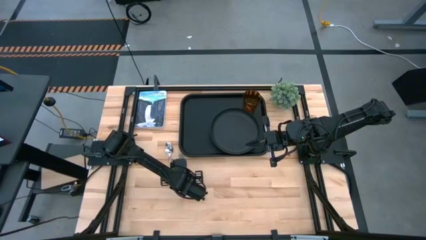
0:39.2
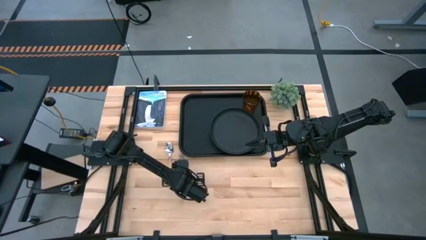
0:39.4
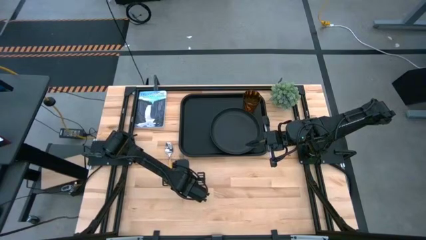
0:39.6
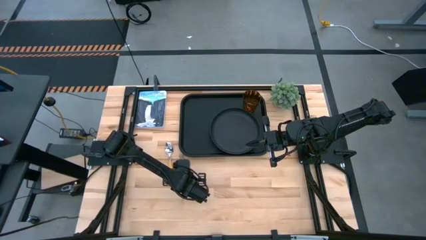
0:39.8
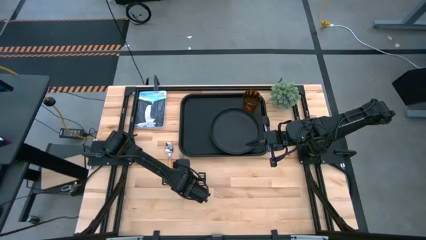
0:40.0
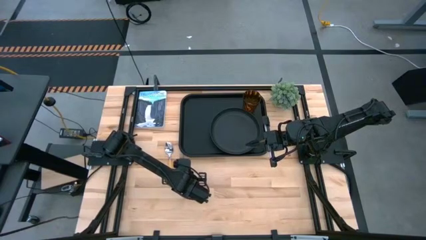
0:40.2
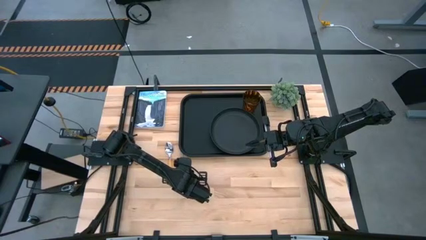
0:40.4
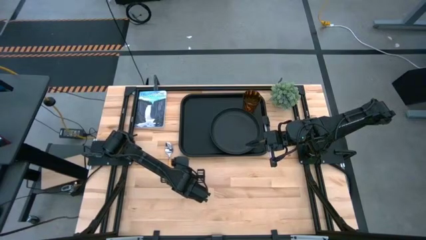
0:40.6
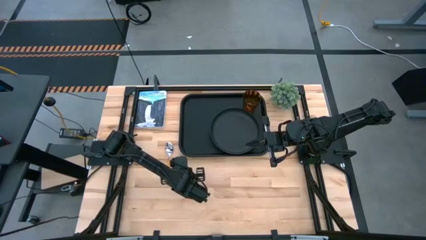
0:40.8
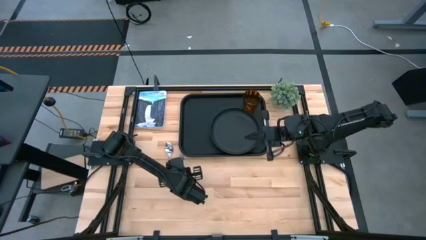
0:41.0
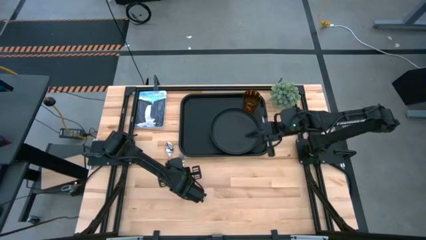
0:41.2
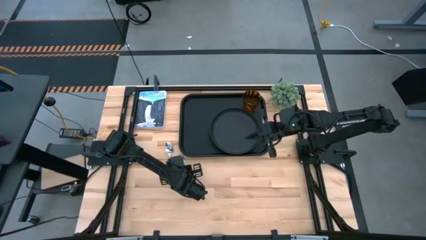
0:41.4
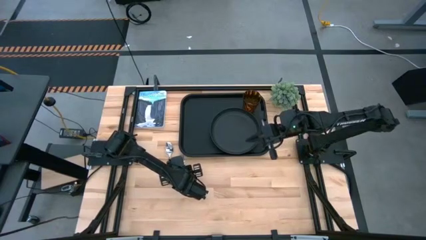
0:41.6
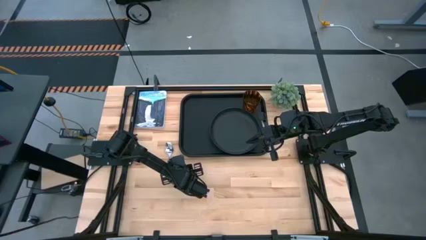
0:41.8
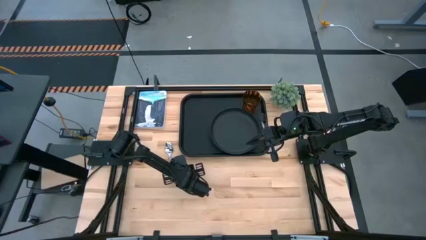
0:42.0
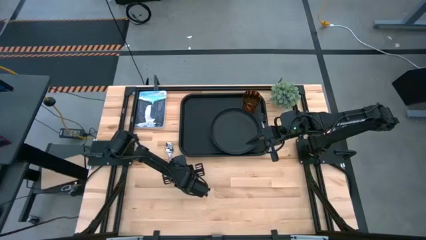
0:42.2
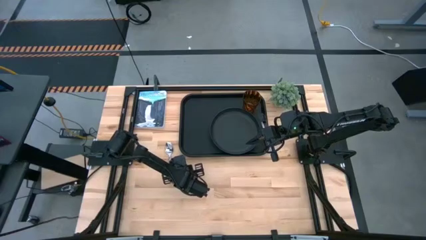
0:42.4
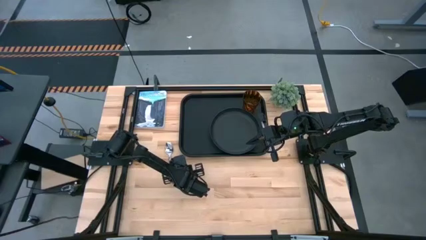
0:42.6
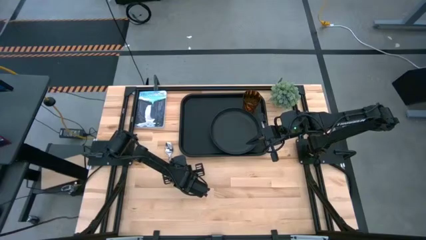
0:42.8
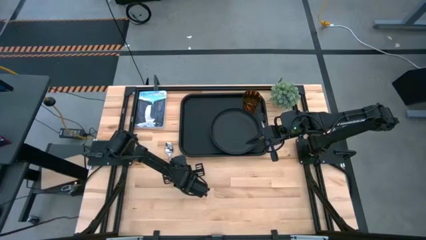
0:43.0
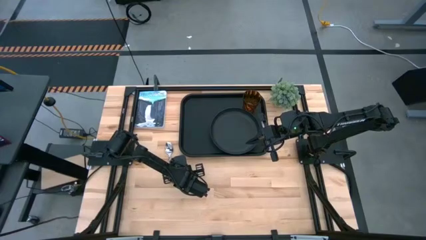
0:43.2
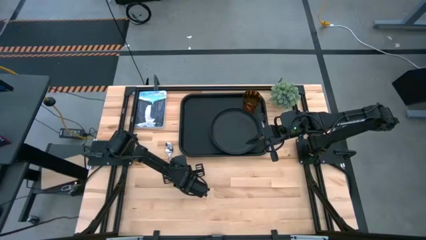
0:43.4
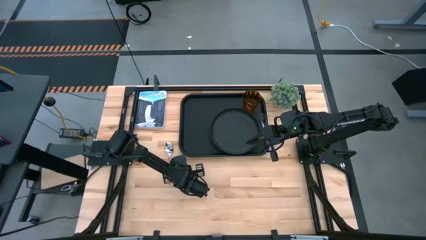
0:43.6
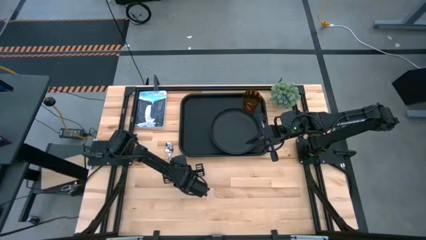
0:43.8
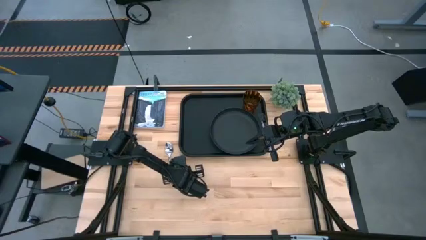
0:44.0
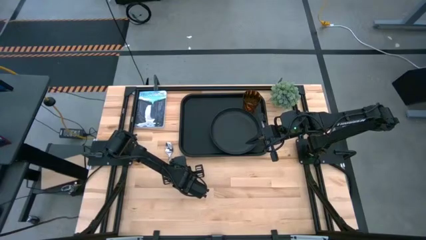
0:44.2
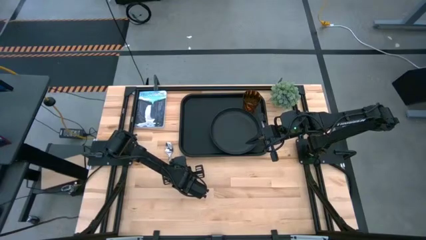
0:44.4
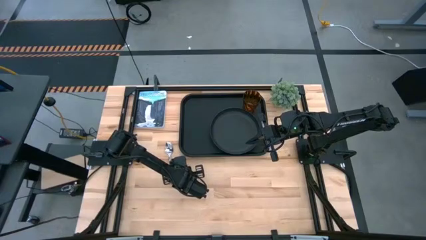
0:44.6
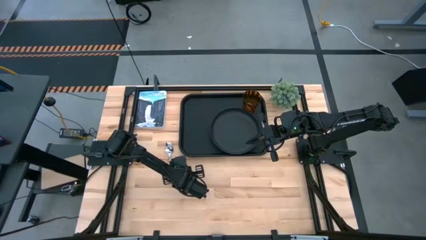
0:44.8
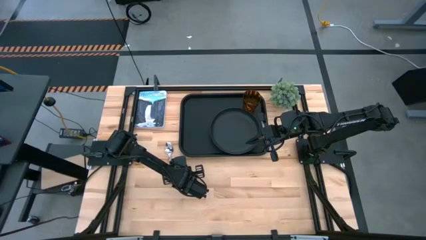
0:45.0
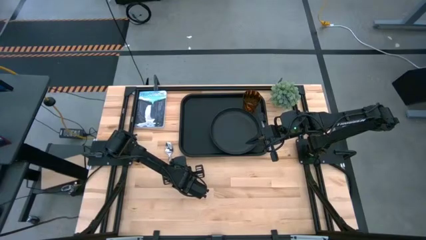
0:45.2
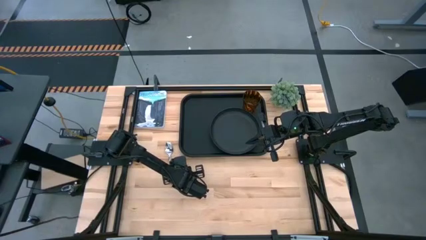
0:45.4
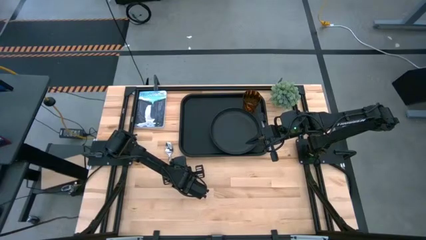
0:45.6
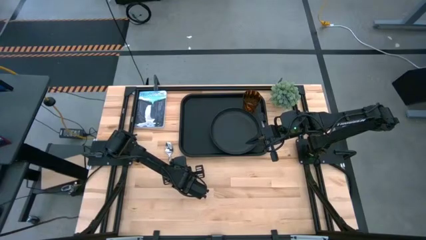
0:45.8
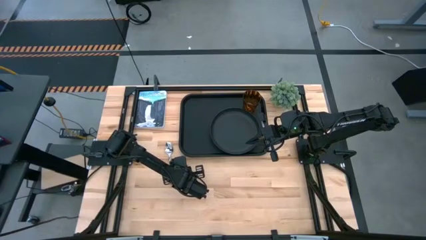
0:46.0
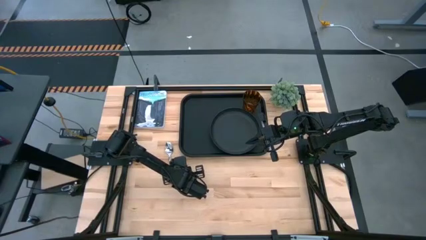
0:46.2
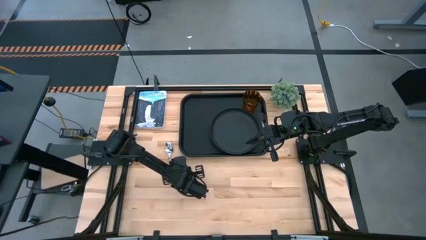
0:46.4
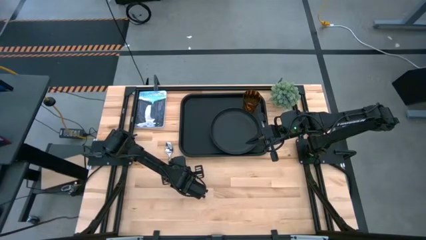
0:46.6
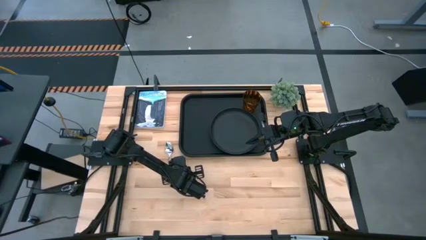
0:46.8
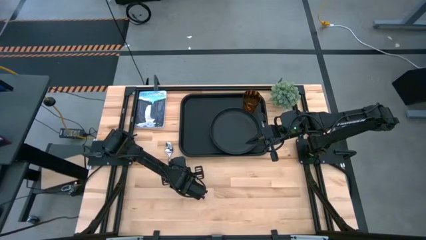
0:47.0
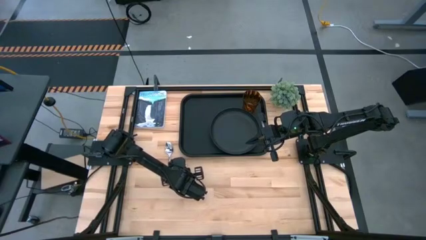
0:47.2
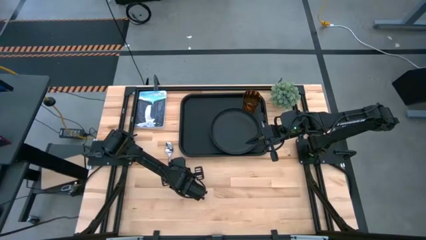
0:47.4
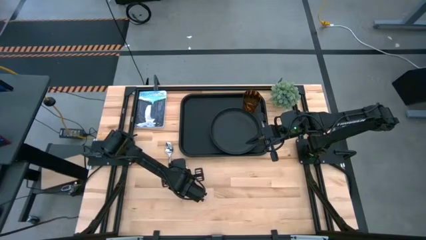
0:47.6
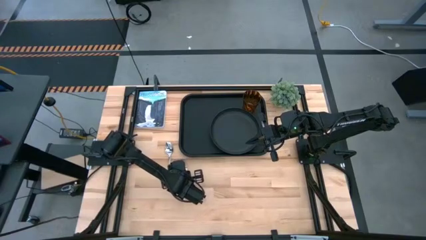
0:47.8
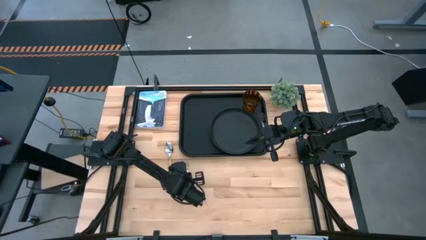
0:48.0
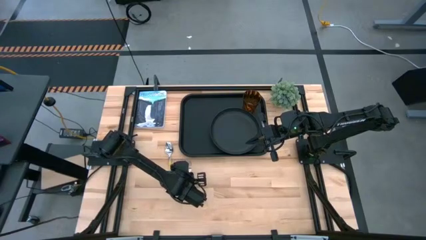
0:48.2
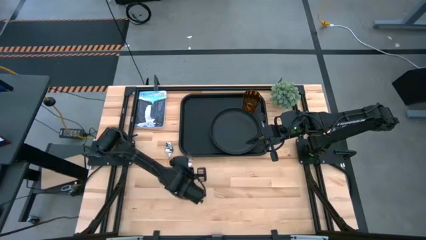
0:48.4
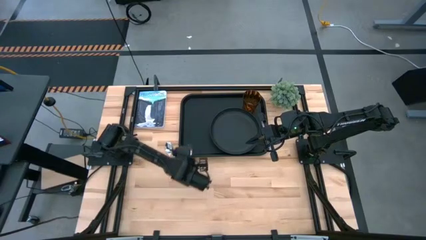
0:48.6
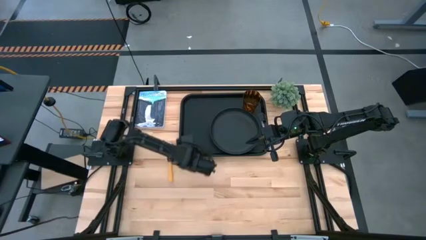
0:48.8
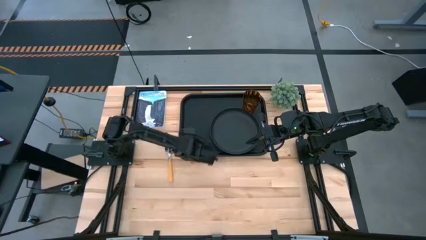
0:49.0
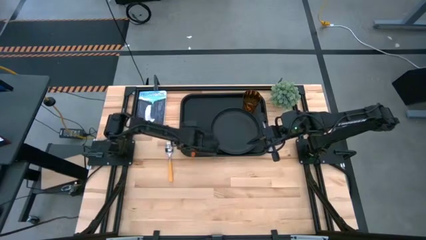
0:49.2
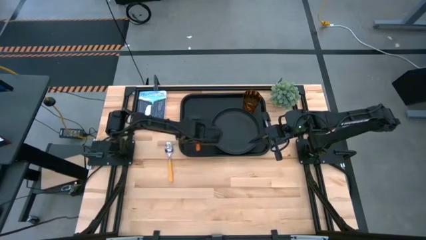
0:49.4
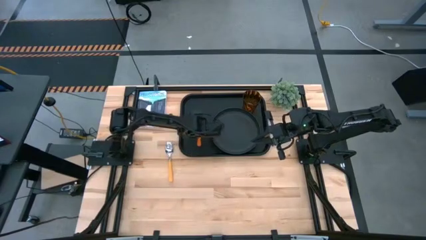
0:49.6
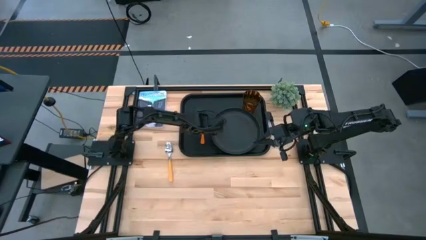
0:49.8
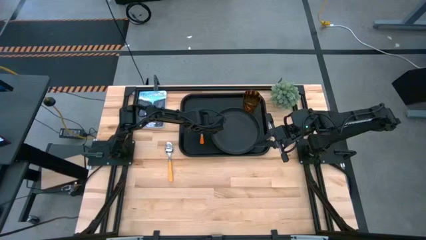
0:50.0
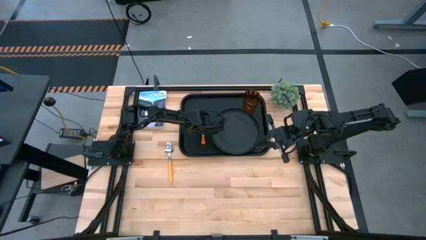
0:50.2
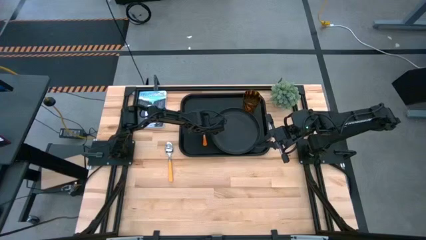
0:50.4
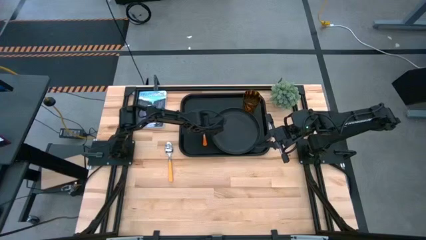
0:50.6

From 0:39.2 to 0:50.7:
Task: Pick and place plate/cup/fork/spoon on tray
Put the orange fork to the left of the black plate on the black tray

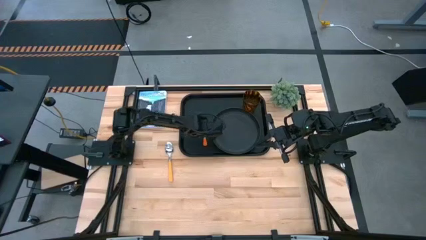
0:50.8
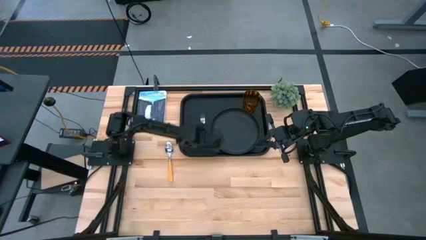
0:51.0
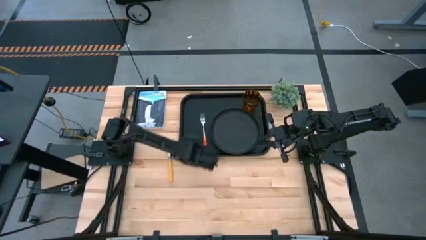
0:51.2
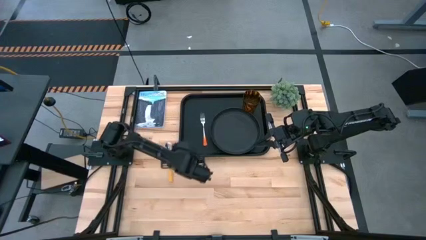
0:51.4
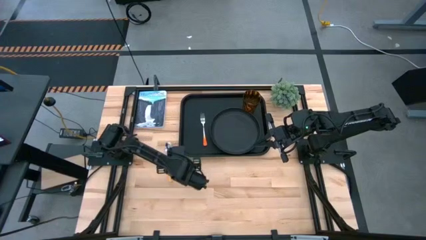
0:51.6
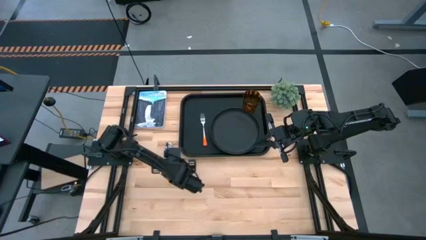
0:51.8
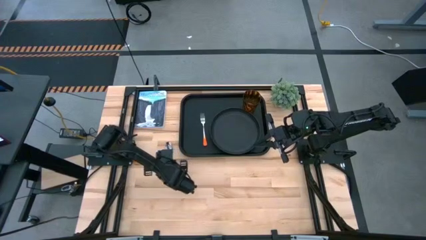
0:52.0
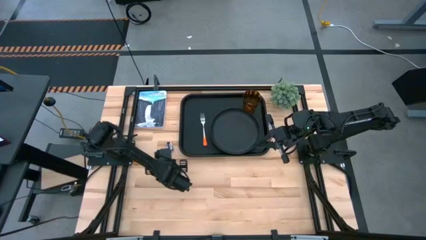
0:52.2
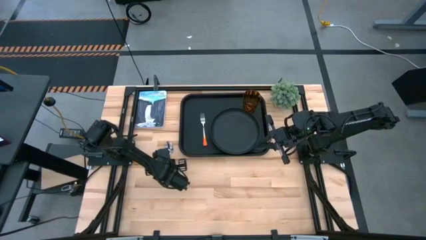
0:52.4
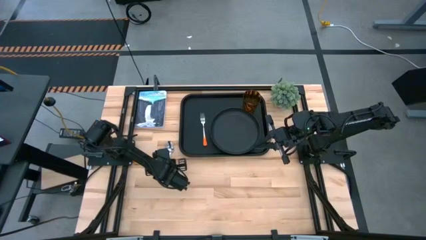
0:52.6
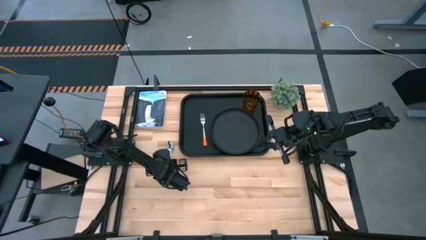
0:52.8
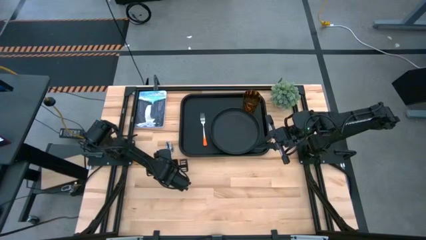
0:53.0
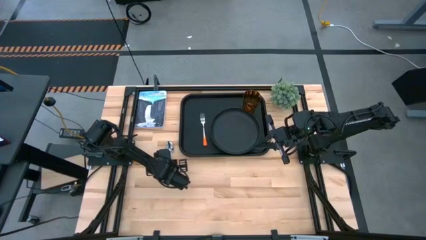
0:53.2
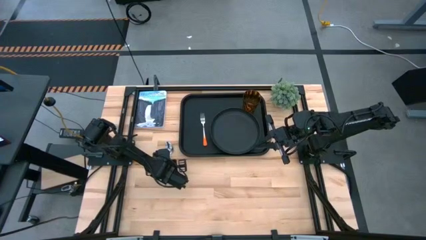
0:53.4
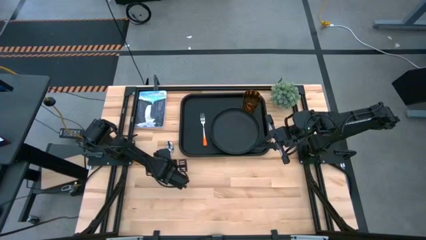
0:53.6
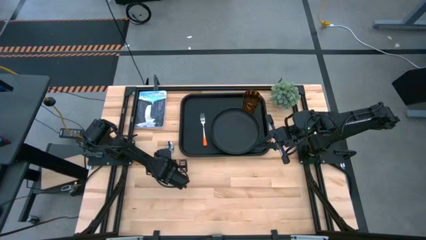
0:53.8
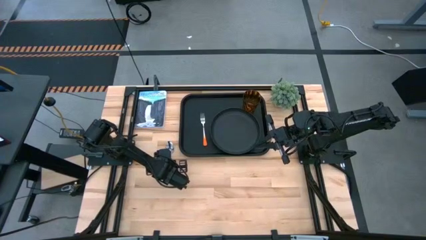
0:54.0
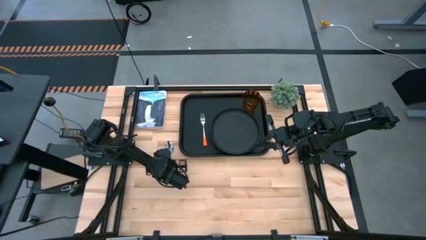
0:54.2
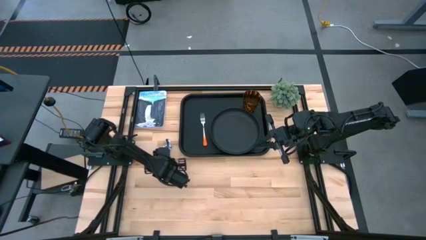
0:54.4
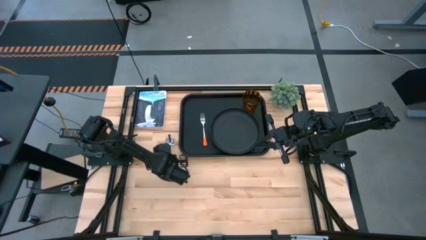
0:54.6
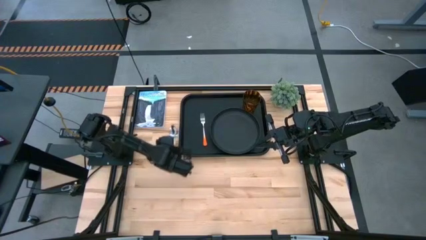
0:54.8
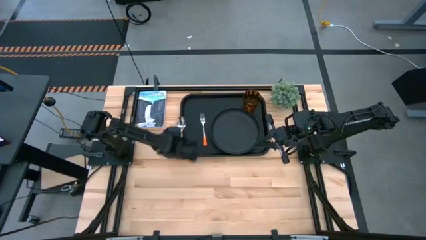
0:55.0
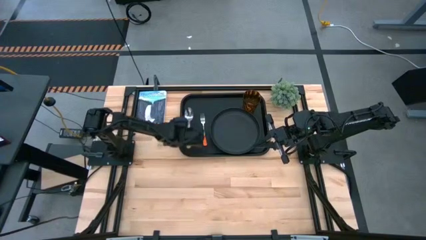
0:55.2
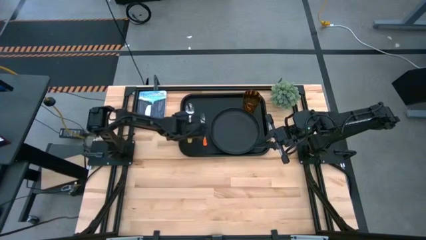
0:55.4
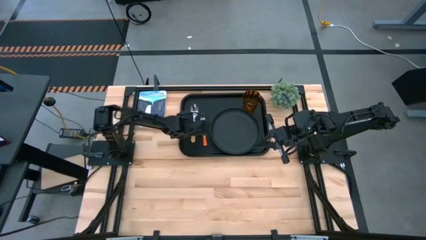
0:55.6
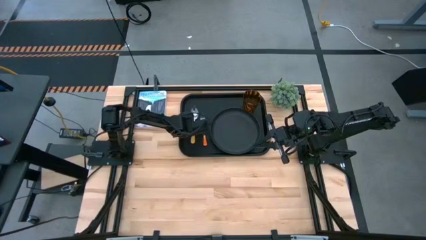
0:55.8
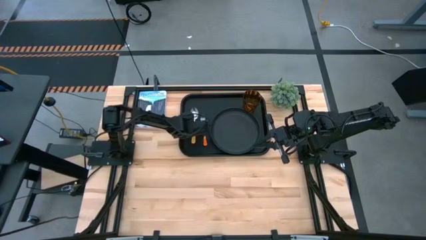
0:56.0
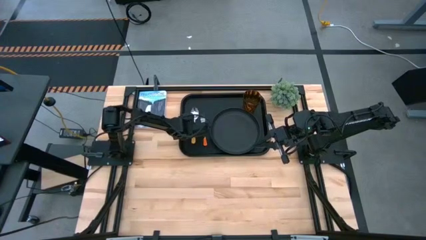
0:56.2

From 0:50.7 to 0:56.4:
Put the yellow spoon to the left of the orange fork on the black tray
